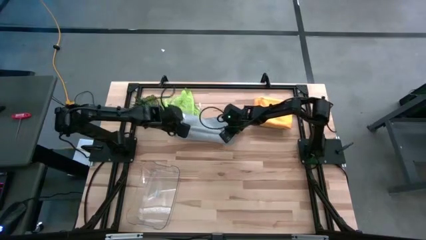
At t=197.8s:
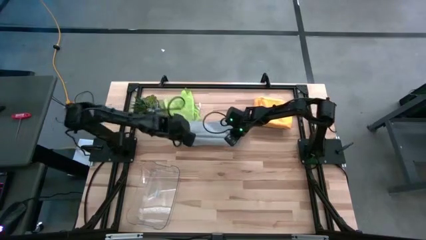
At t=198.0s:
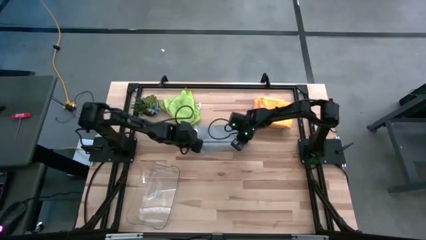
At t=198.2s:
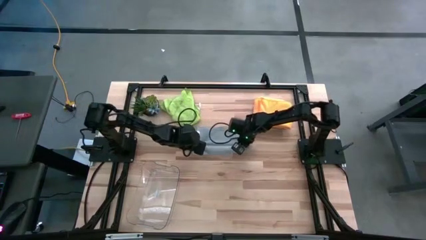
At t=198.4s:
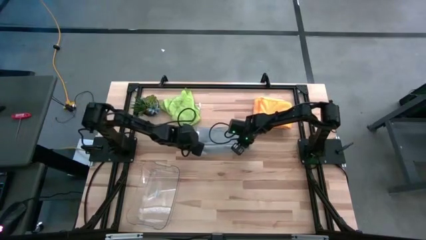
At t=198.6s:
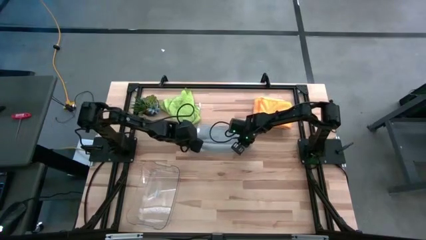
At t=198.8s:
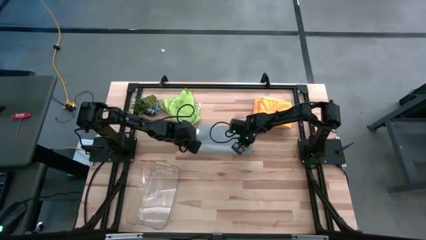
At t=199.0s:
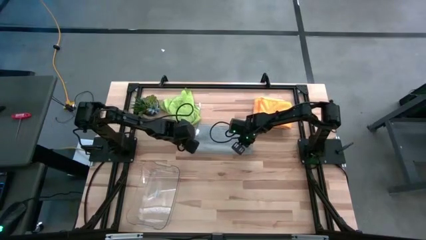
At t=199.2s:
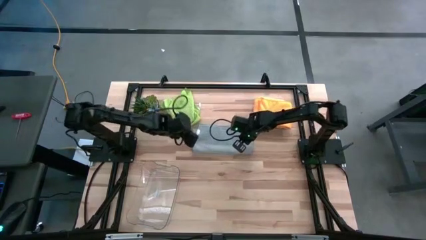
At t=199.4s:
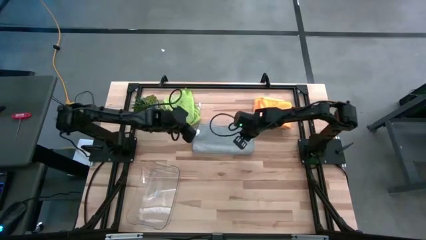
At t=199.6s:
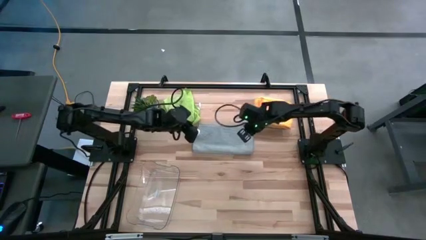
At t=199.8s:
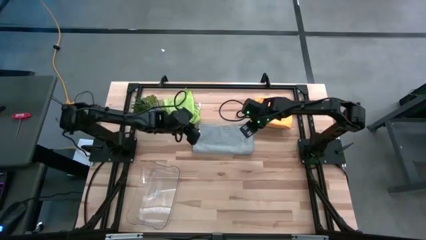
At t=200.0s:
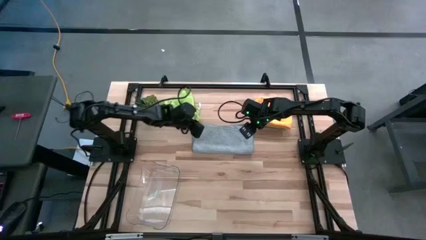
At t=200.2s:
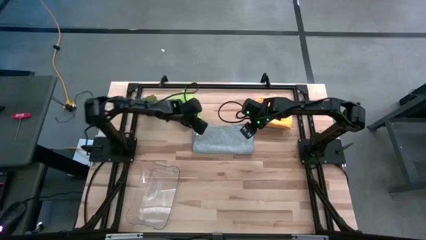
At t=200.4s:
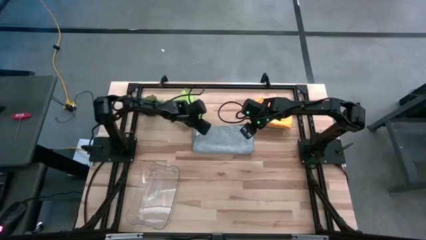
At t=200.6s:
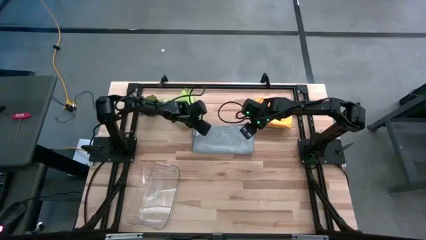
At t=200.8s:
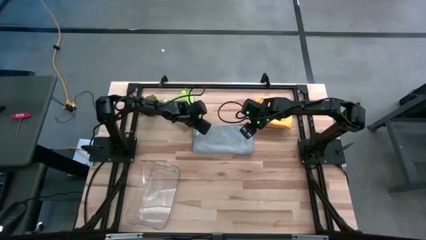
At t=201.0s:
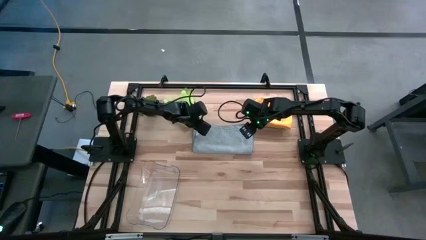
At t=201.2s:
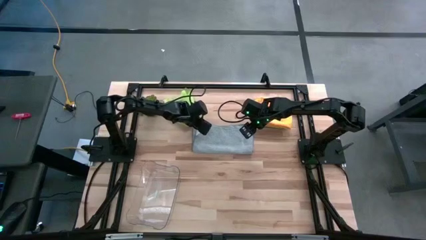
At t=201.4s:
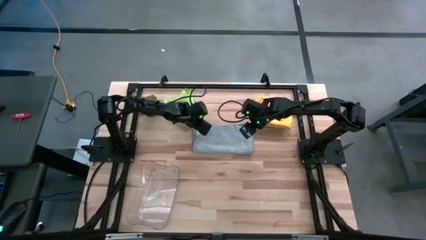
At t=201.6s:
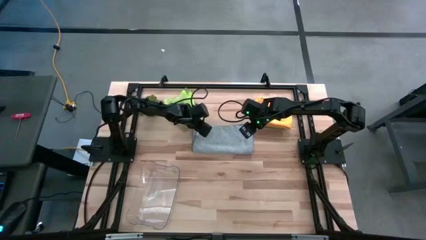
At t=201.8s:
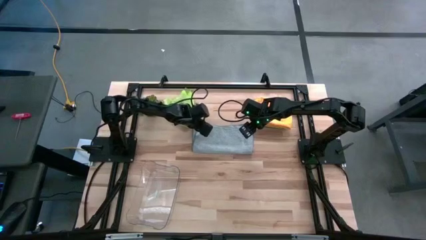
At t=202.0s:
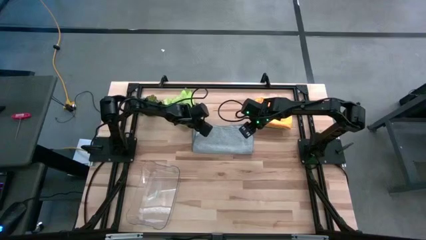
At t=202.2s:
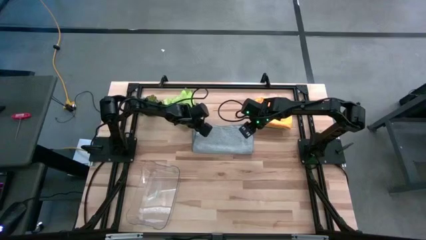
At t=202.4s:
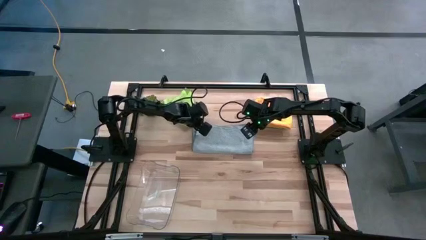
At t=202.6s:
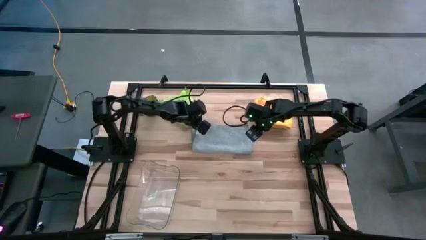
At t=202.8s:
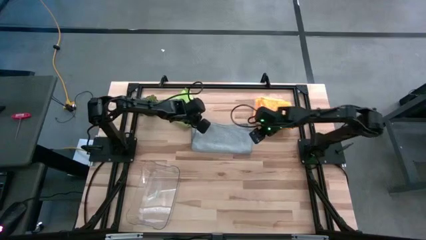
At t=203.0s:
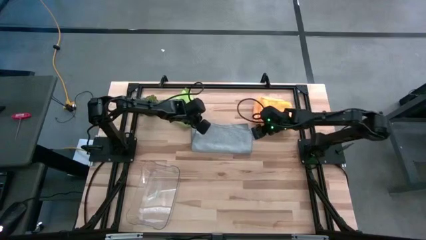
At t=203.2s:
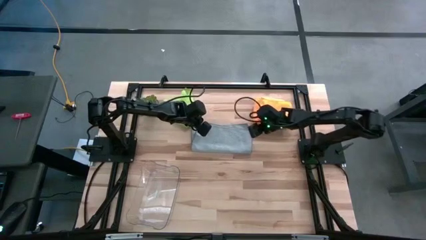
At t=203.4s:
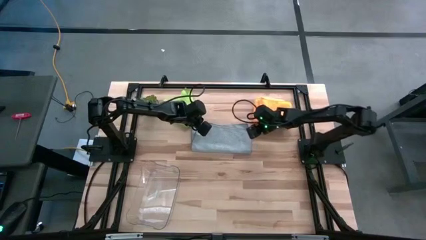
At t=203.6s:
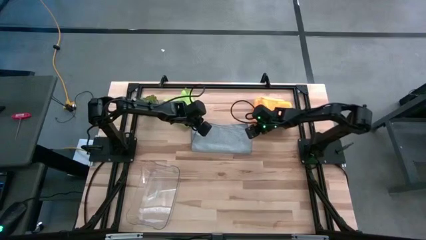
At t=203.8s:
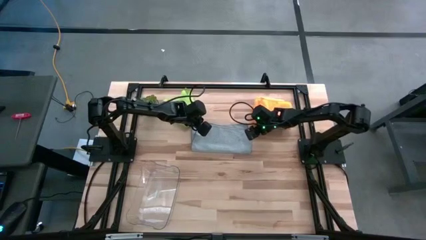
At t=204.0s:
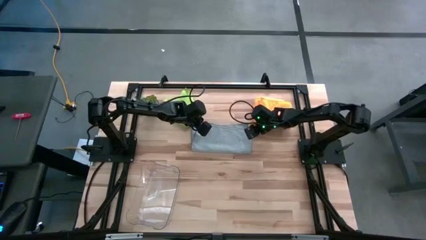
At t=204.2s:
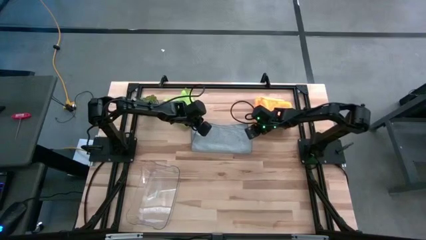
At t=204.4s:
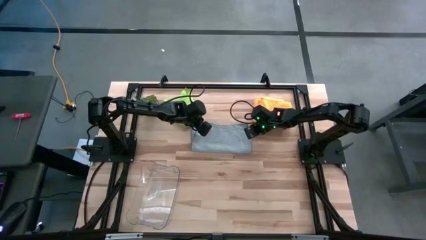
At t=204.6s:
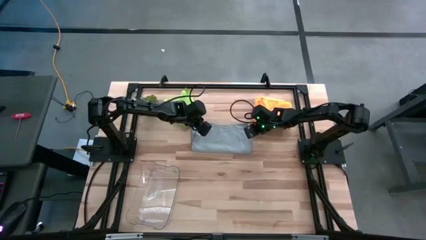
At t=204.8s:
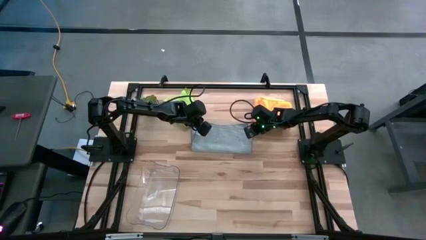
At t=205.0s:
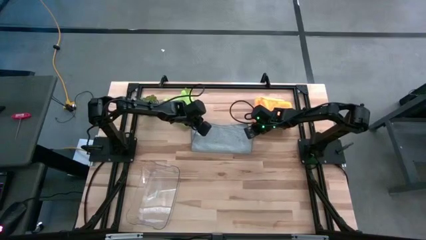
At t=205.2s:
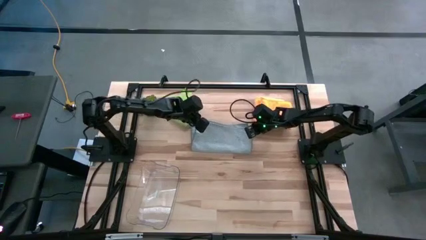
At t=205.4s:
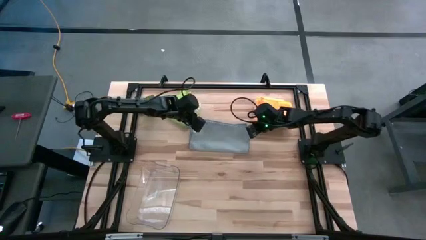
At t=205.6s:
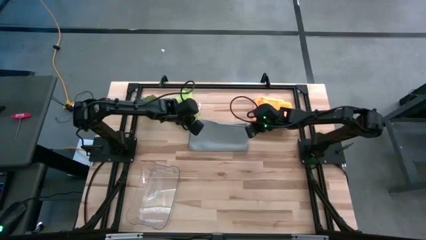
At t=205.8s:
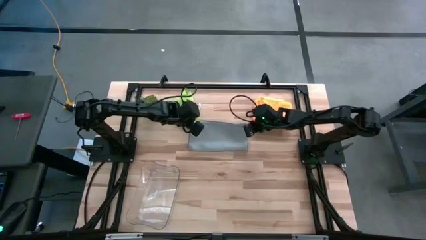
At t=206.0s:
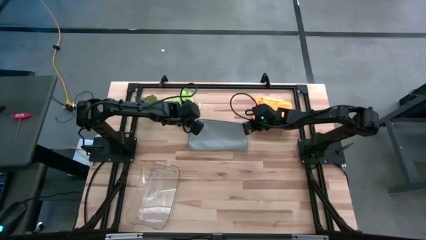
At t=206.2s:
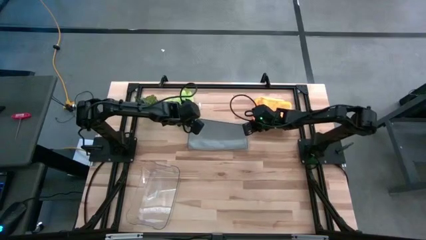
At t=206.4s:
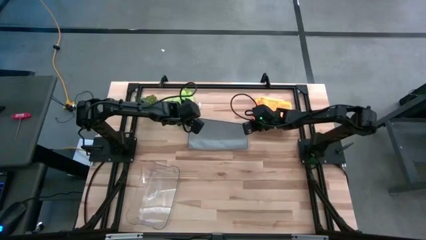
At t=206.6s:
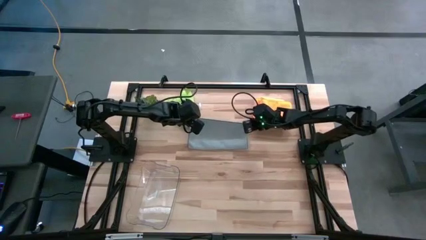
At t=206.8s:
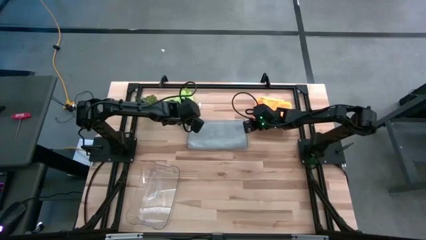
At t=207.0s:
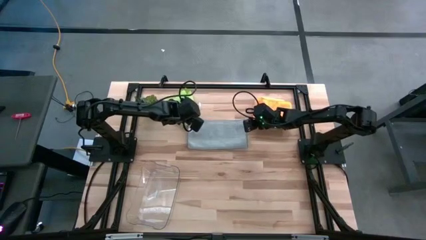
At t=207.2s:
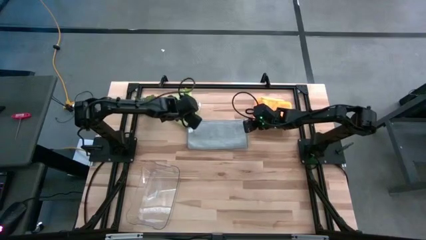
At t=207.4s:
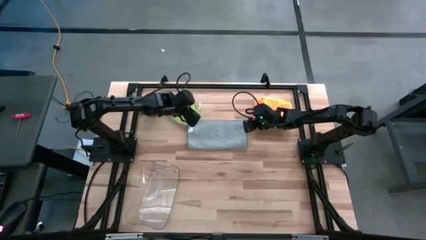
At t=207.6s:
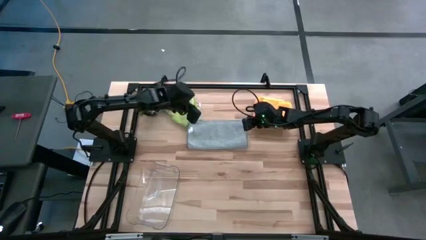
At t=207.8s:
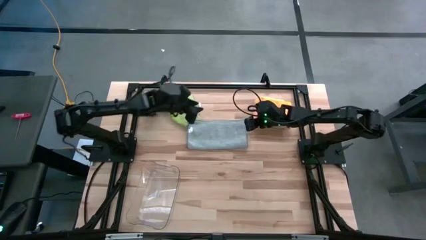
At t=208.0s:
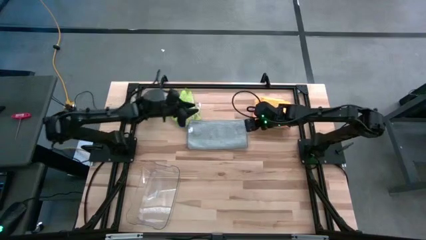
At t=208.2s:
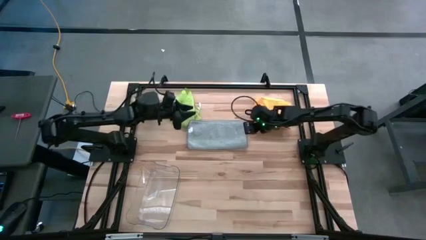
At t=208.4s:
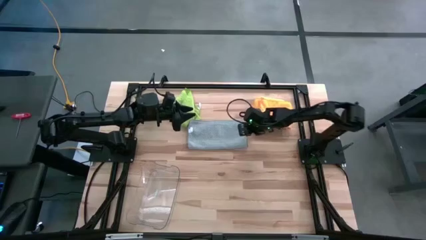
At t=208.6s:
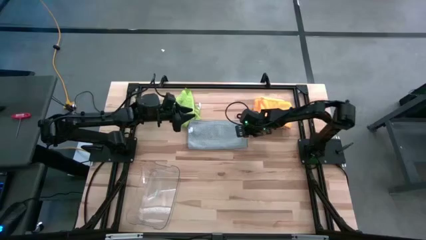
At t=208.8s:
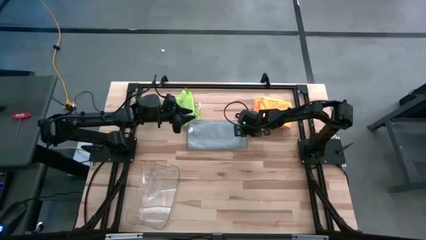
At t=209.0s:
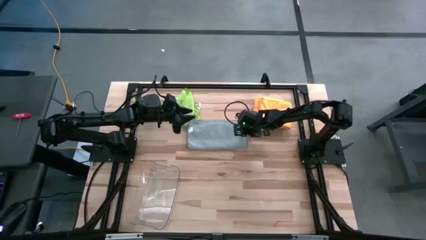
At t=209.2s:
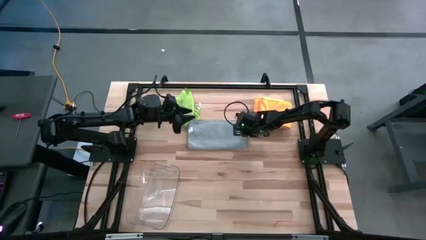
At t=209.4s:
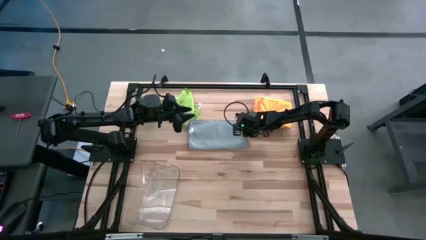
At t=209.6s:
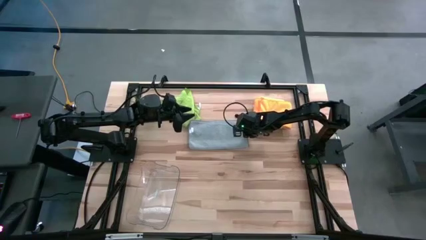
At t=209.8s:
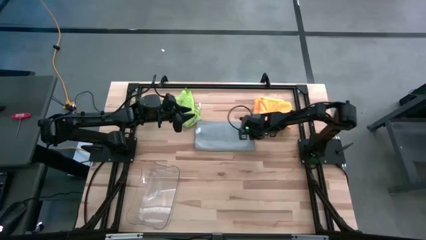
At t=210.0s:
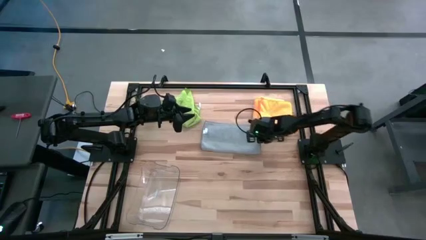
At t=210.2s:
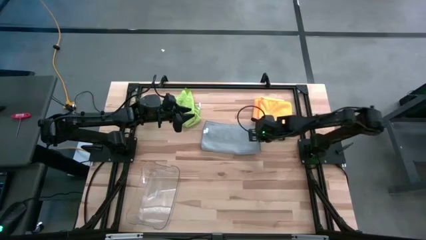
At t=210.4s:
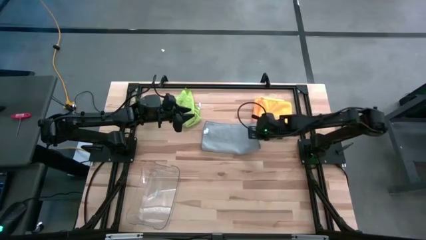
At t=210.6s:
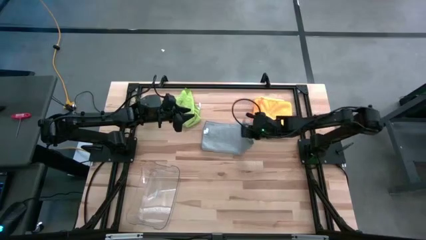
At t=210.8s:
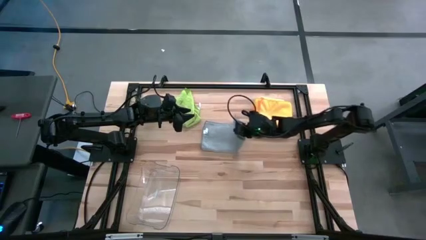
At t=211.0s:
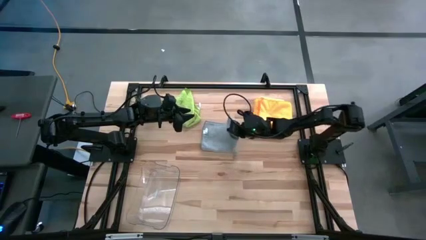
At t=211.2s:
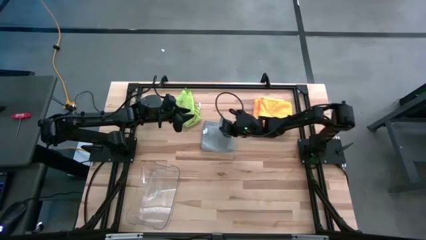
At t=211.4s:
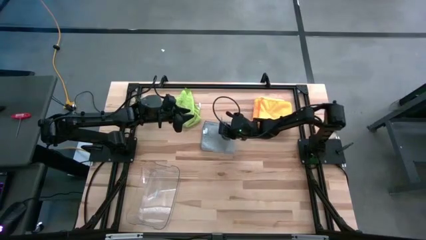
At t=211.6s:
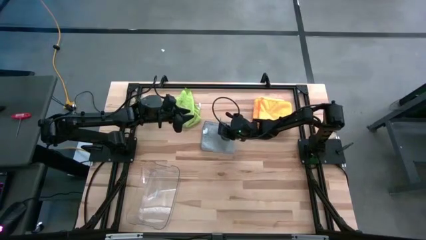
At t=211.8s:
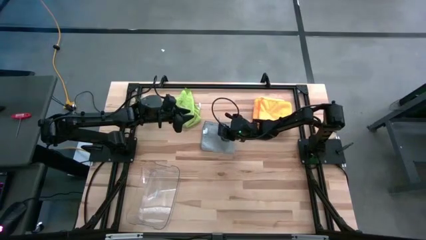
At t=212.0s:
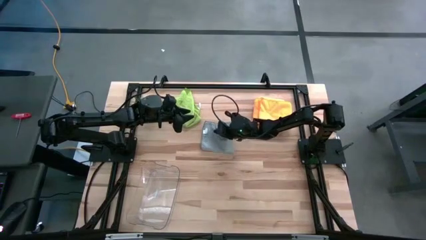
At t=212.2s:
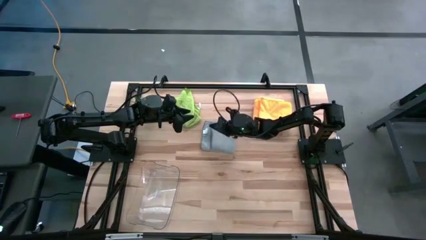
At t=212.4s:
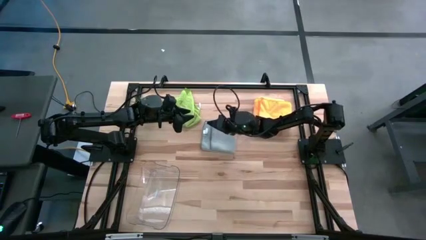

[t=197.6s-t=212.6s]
Task: Fold microfiber towels
Fold the light blue towel

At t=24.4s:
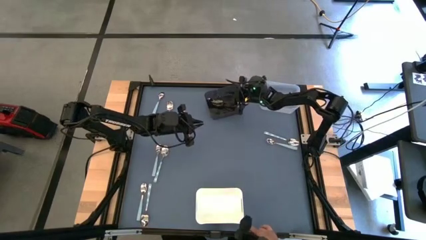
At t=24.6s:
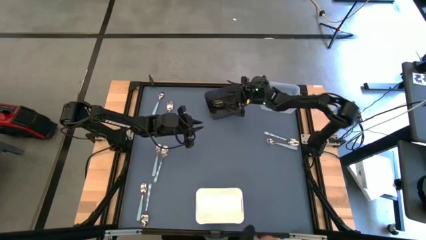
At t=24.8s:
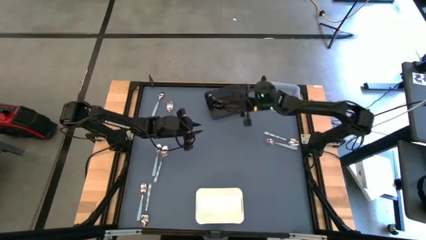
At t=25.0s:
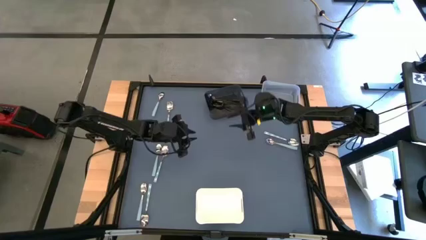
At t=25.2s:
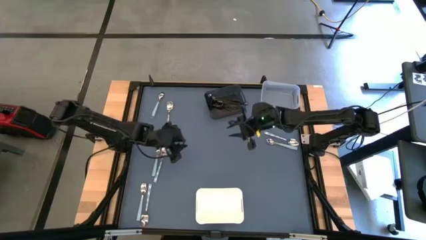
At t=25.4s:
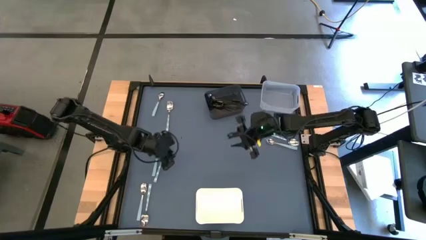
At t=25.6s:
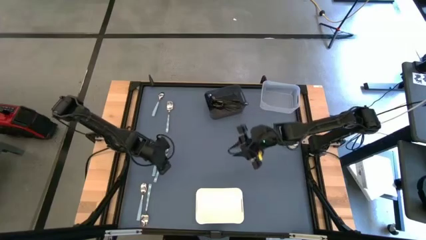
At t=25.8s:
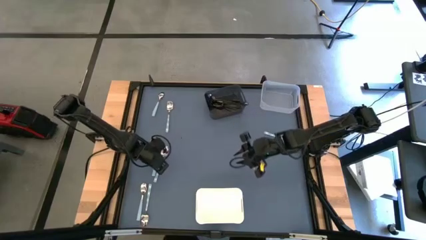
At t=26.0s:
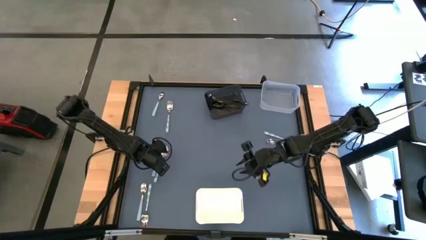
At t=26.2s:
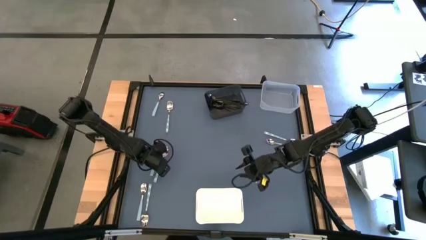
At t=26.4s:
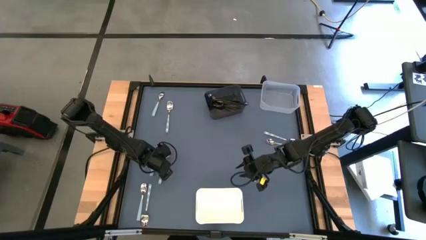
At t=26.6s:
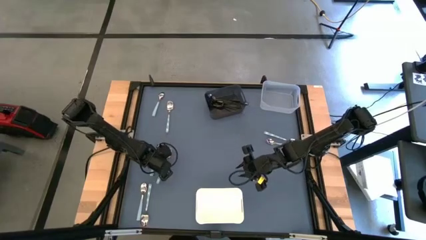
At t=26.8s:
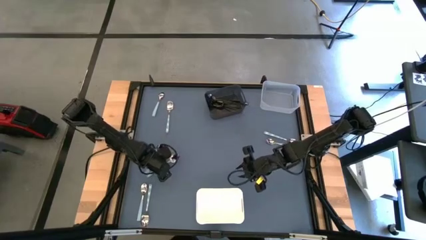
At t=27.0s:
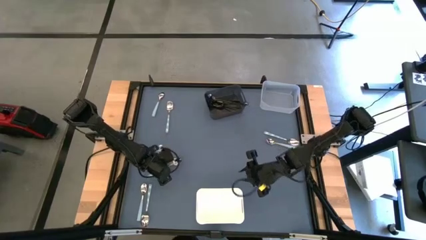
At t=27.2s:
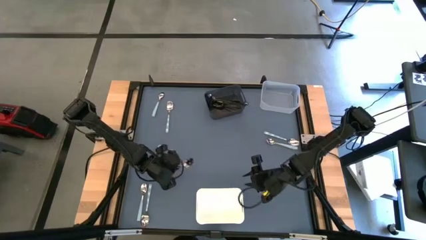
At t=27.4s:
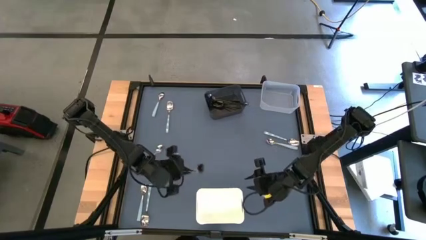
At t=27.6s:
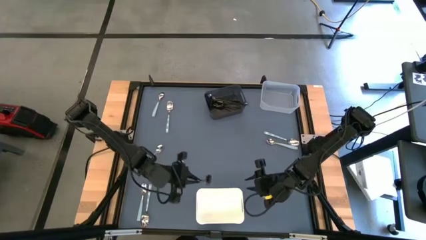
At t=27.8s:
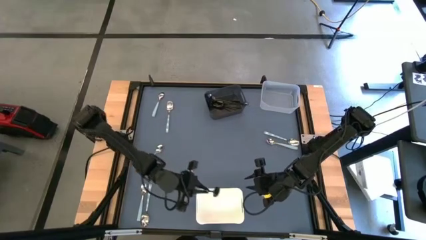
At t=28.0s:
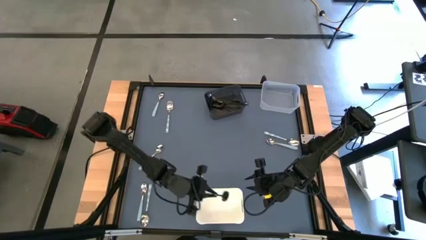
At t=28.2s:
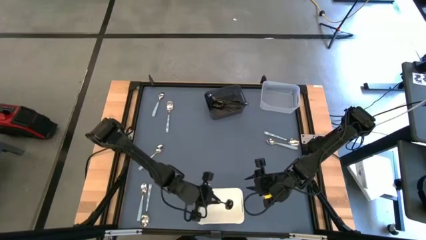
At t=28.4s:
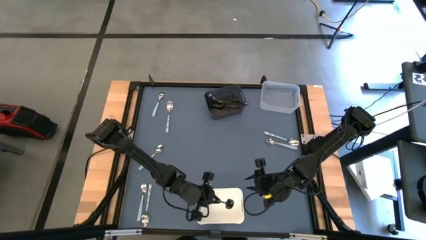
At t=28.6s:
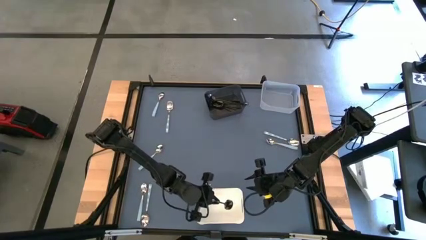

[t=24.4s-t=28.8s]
Task: Sort silverware by color (type)
Put the white patterned spoon into the white bin
